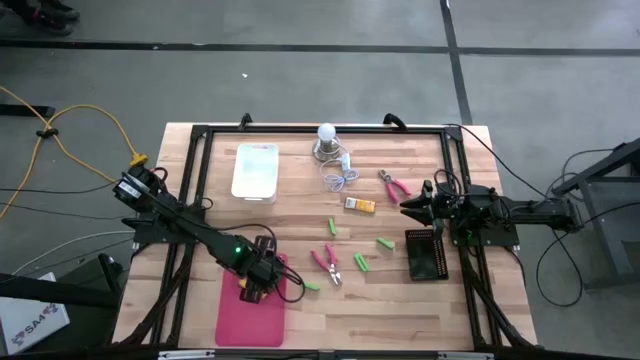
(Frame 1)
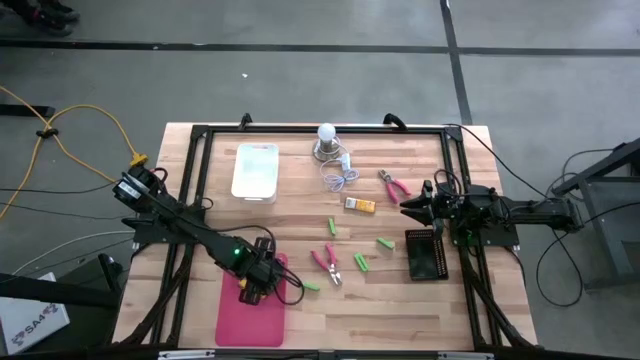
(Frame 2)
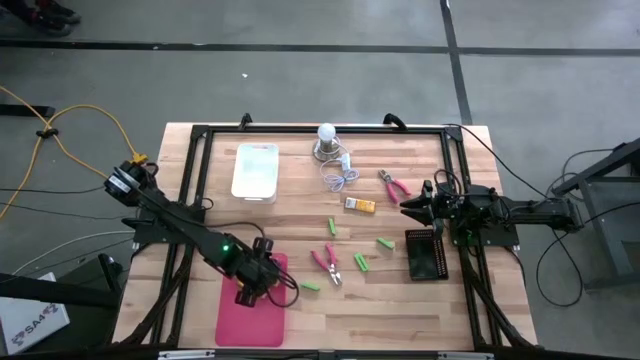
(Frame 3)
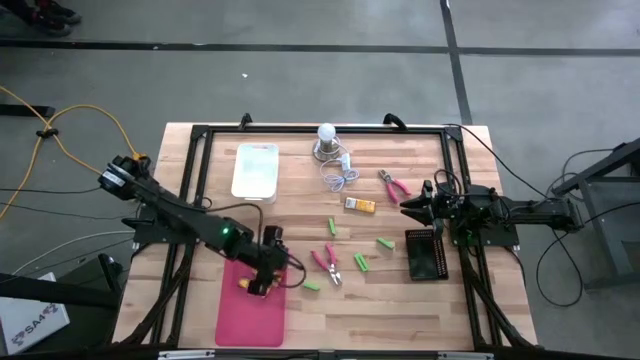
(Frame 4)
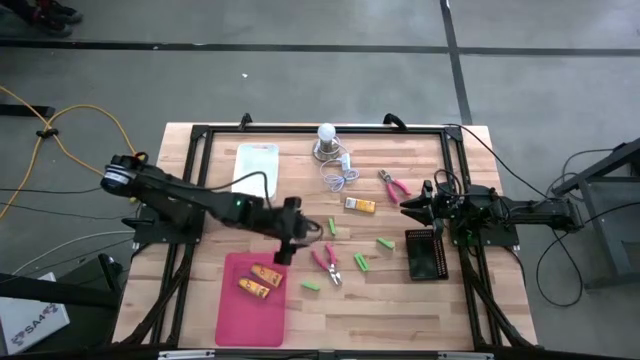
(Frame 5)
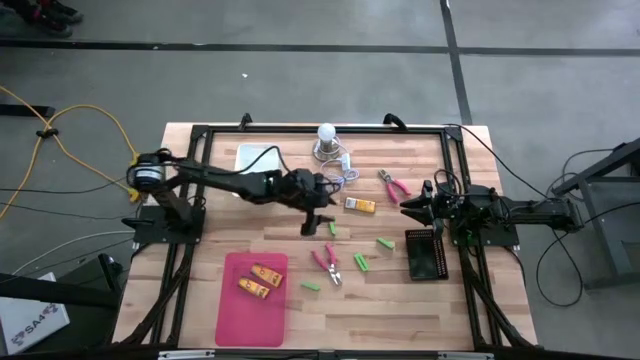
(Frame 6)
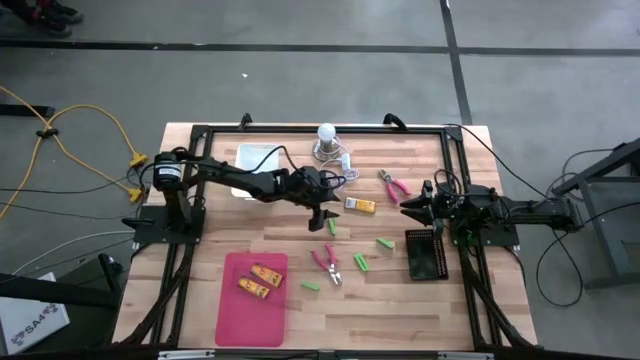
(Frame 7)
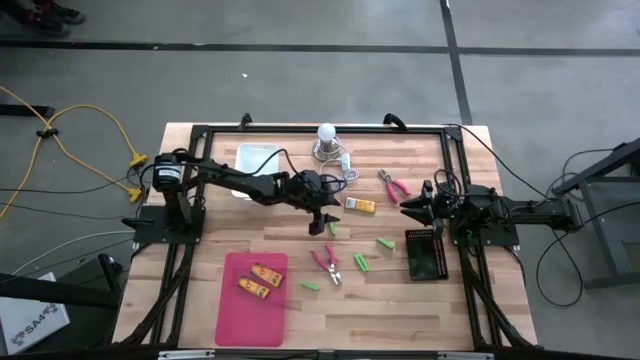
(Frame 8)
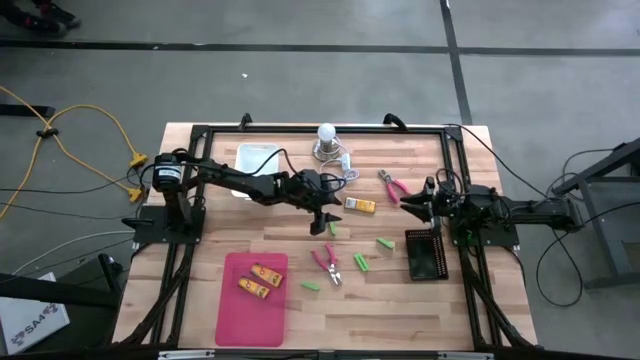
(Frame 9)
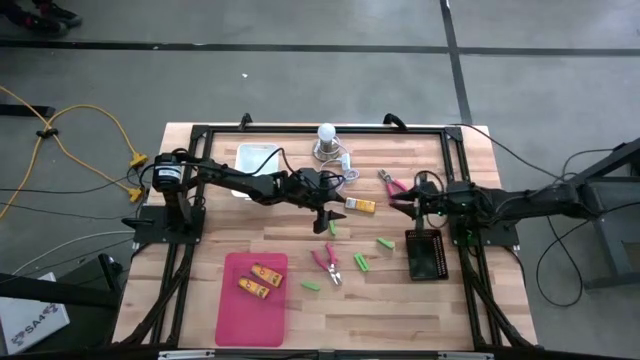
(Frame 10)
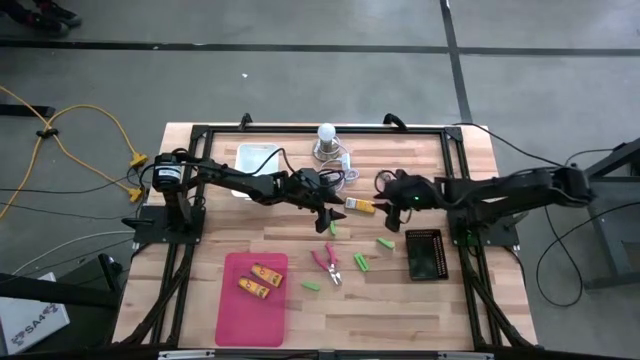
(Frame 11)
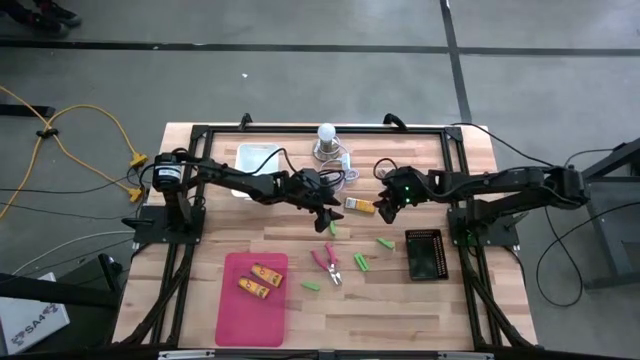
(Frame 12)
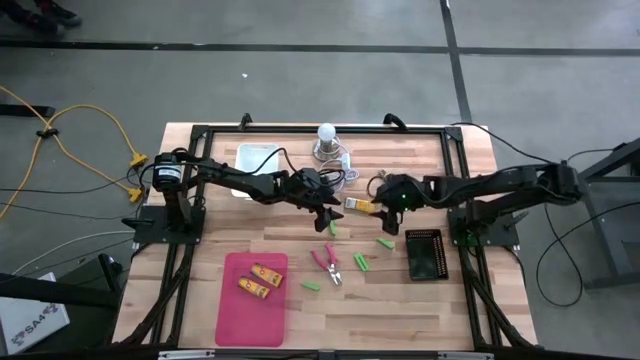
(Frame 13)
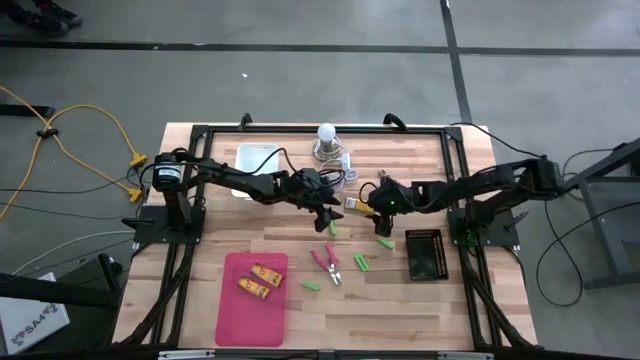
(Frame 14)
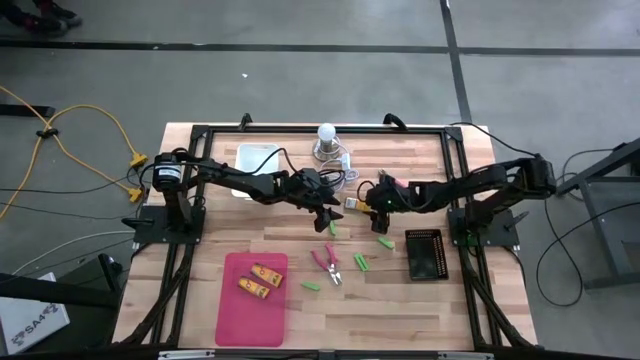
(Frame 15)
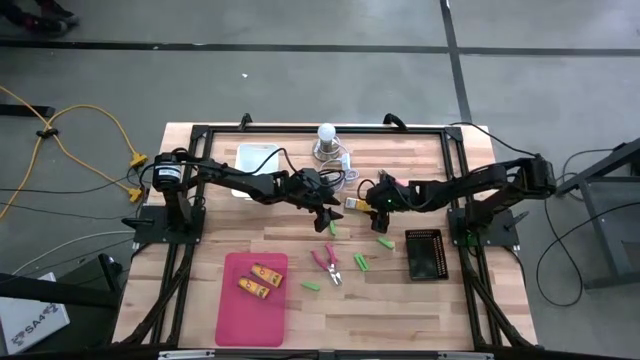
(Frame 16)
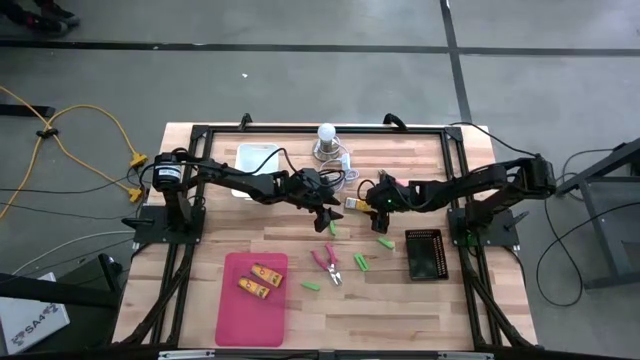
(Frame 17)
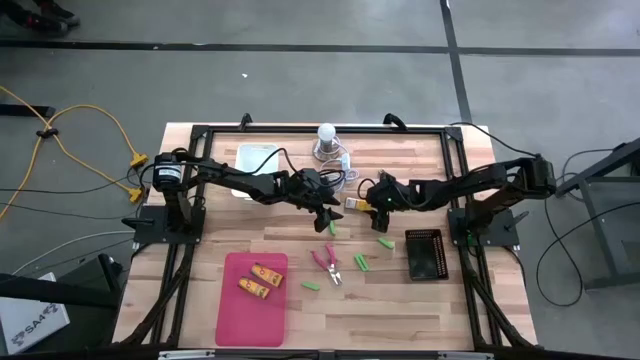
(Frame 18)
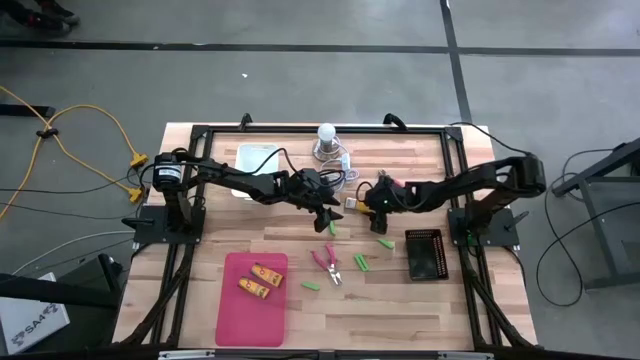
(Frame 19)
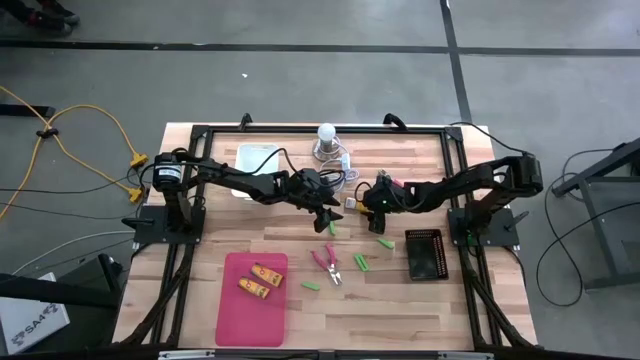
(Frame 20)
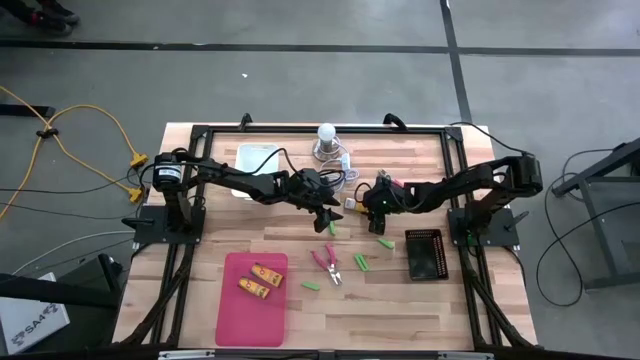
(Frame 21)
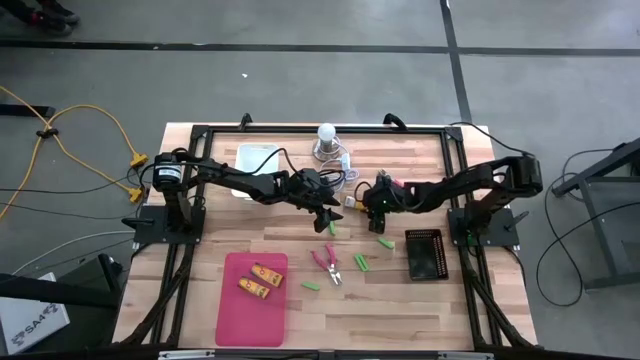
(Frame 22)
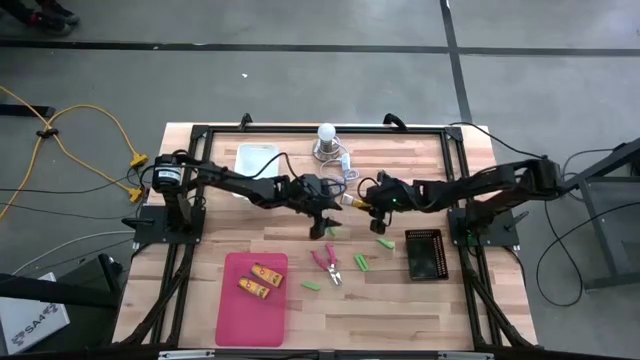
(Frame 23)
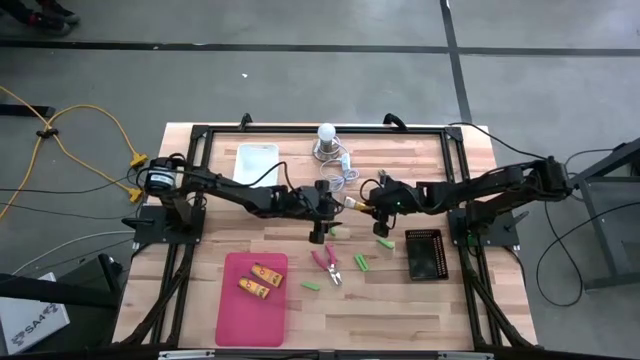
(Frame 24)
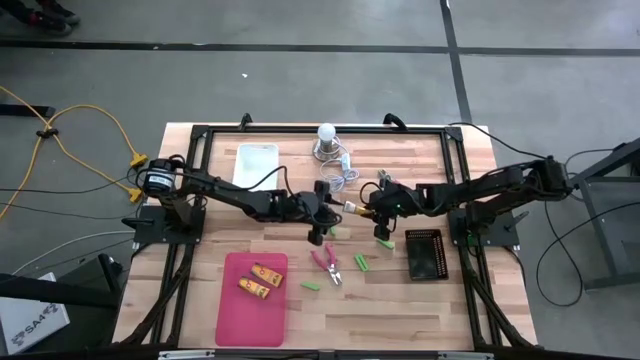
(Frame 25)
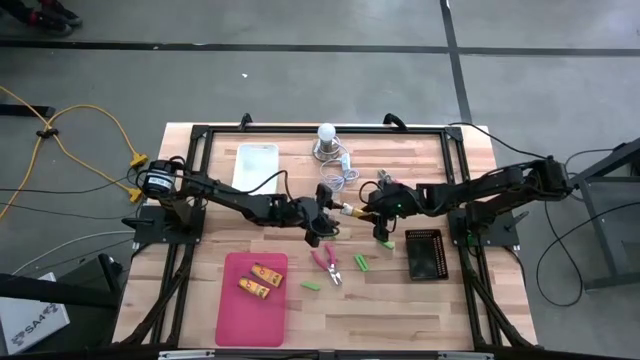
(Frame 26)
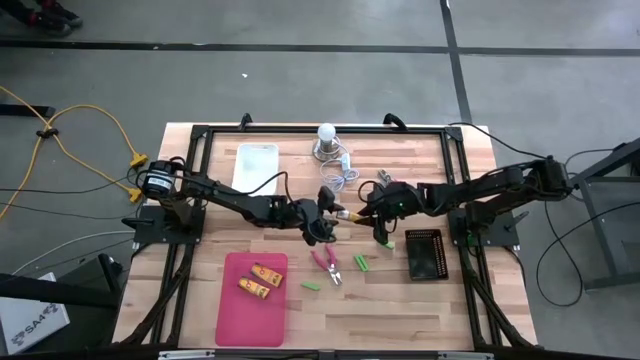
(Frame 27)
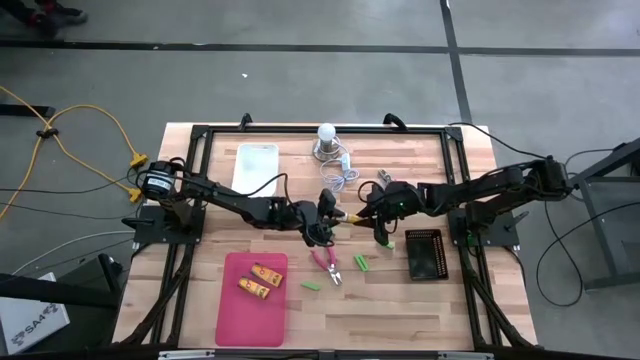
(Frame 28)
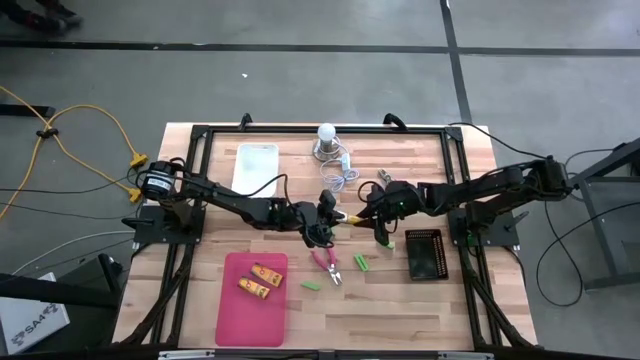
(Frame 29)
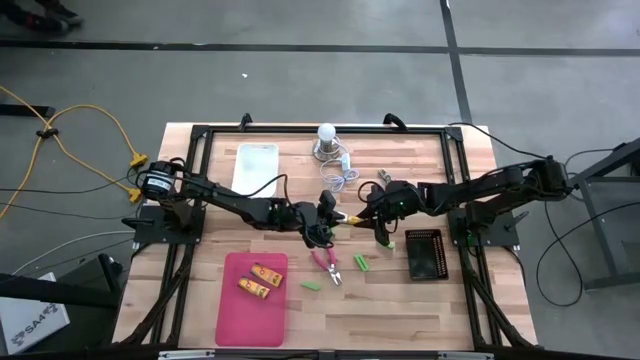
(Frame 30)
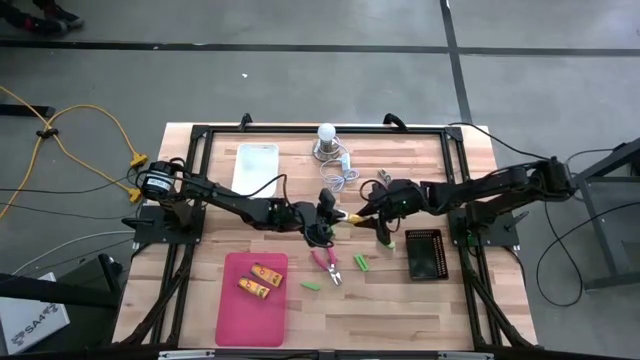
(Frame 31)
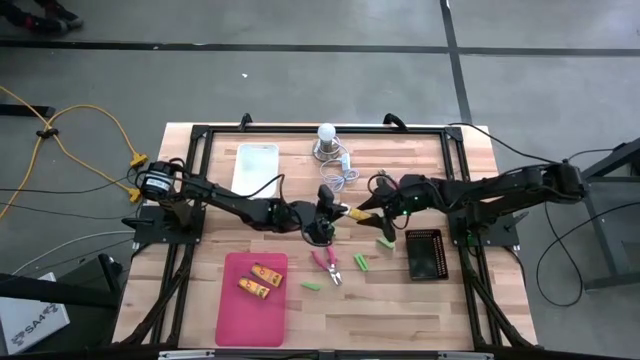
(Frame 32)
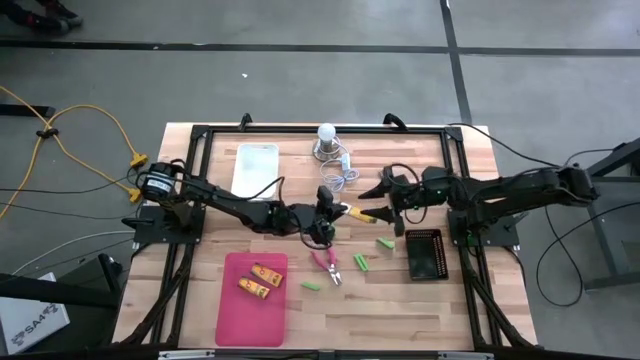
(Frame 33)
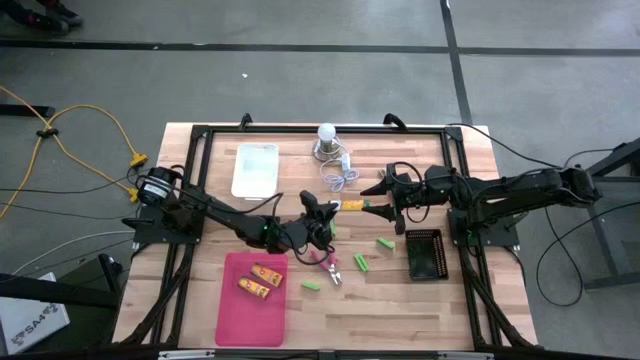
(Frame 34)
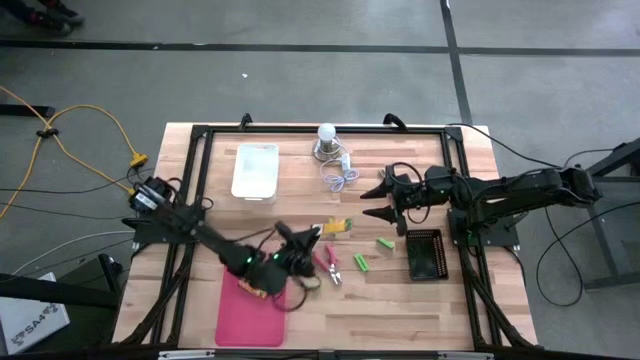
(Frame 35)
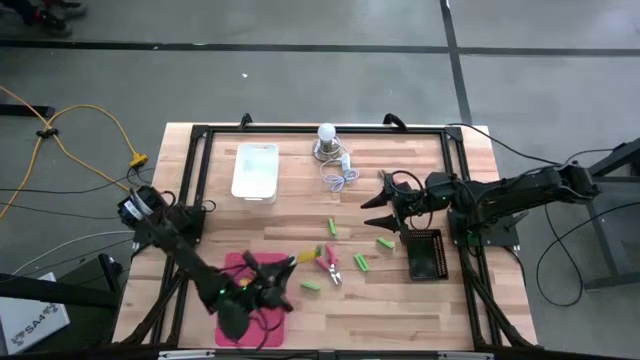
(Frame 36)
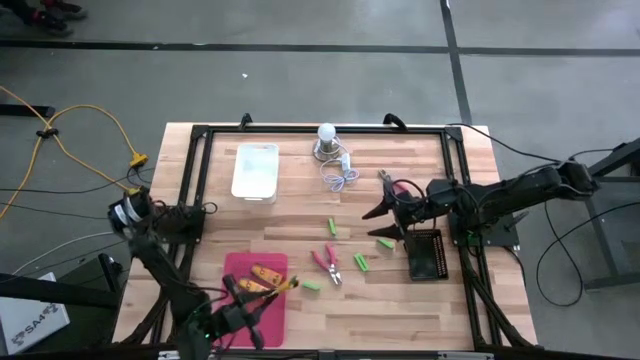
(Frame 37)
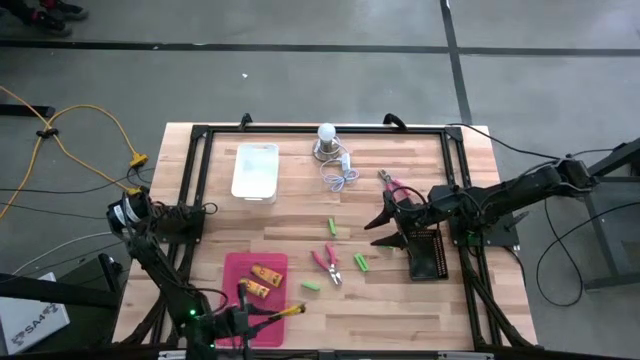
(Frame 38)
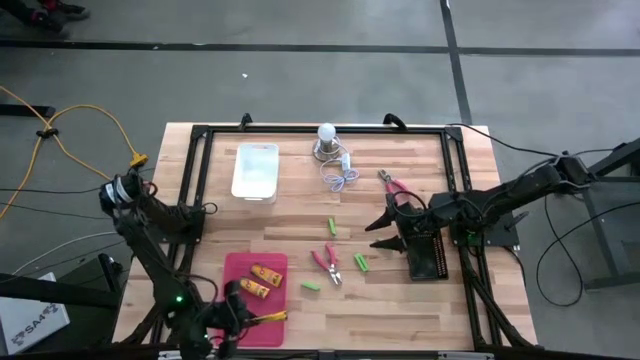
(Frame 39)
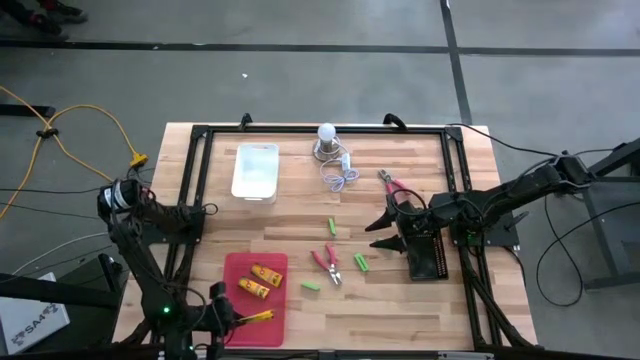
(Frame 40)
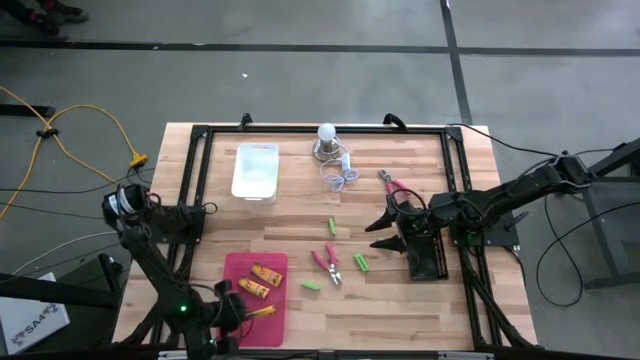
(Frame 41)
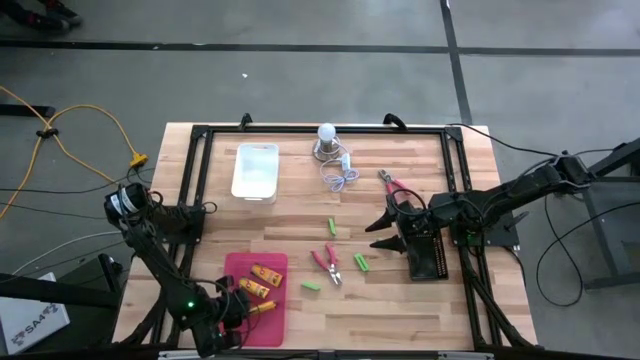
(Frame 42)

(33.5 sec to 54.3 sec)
Task: Pick & Place School Supplies
Put the crayon box into the pink bin
